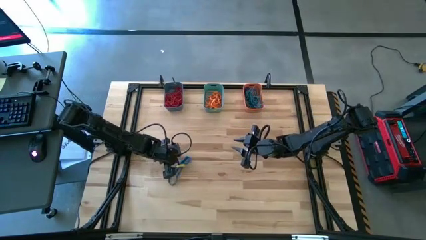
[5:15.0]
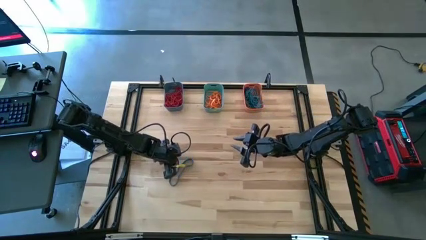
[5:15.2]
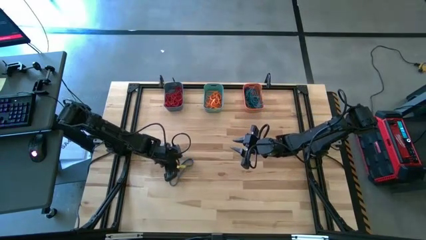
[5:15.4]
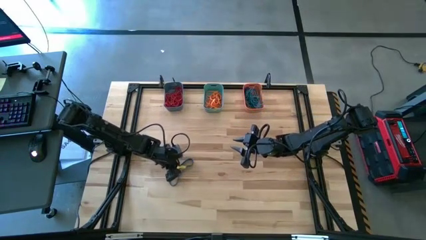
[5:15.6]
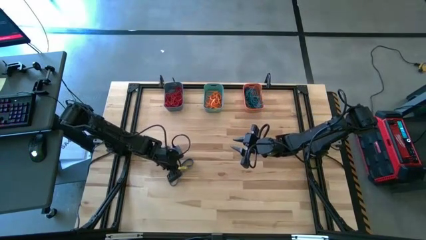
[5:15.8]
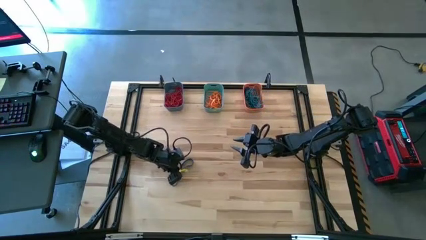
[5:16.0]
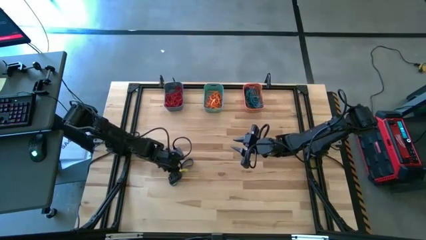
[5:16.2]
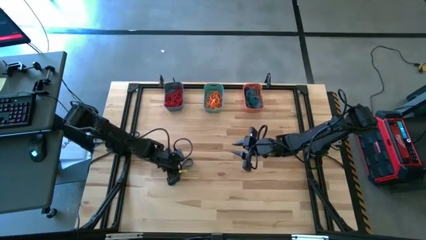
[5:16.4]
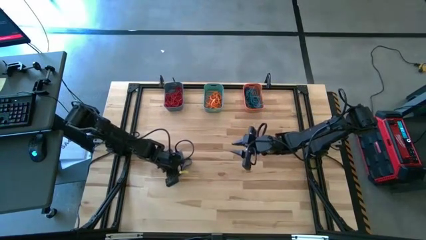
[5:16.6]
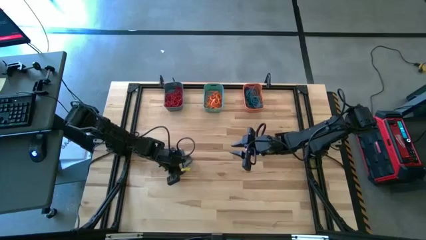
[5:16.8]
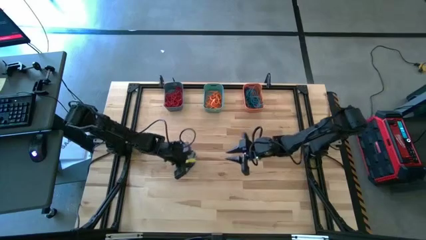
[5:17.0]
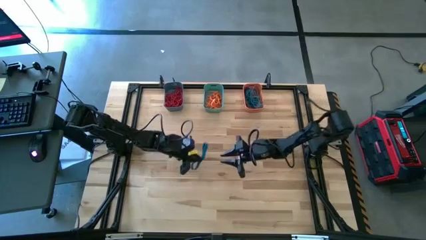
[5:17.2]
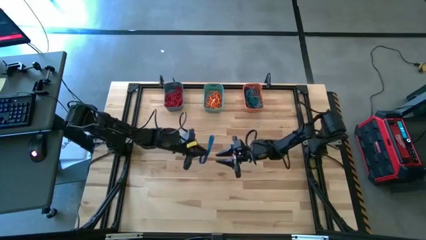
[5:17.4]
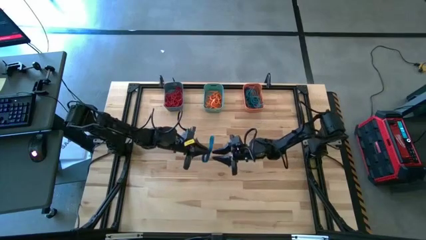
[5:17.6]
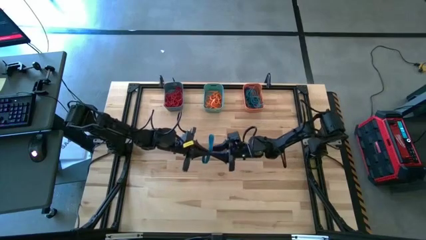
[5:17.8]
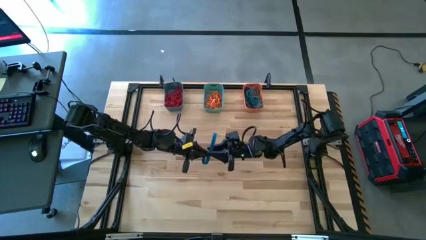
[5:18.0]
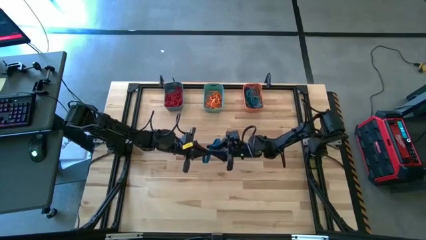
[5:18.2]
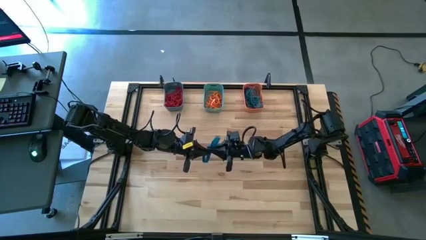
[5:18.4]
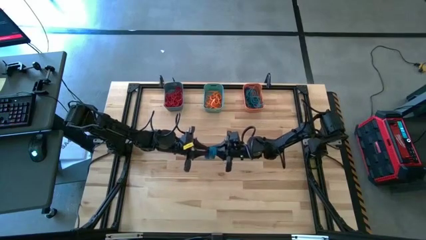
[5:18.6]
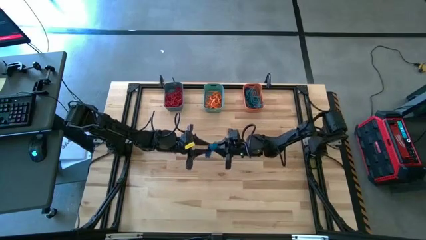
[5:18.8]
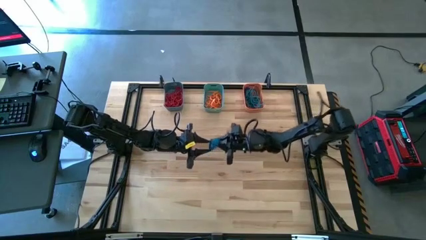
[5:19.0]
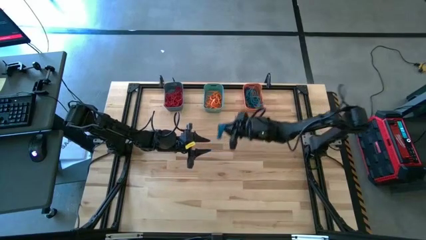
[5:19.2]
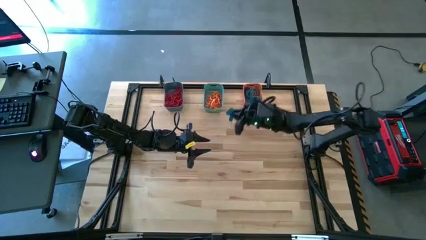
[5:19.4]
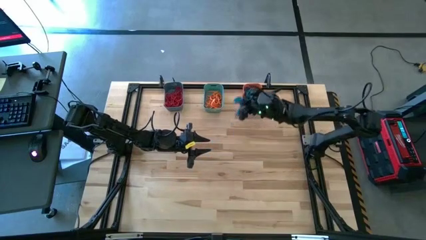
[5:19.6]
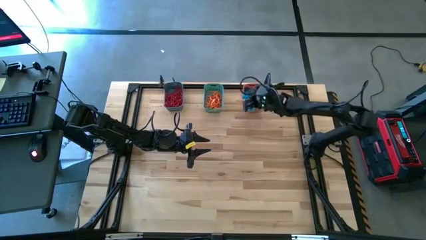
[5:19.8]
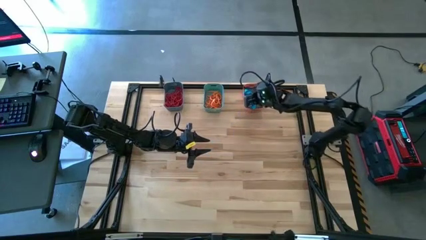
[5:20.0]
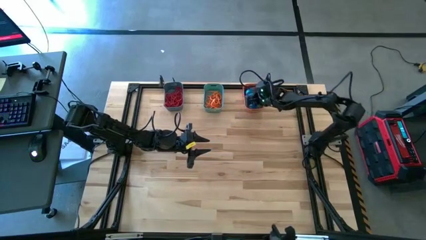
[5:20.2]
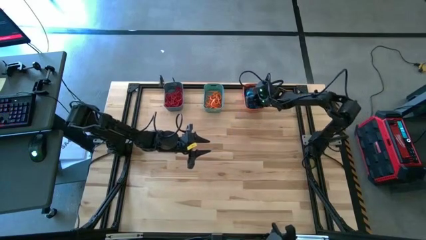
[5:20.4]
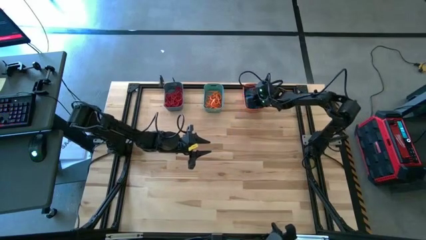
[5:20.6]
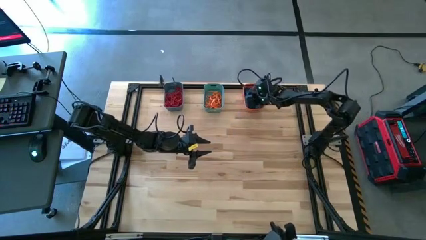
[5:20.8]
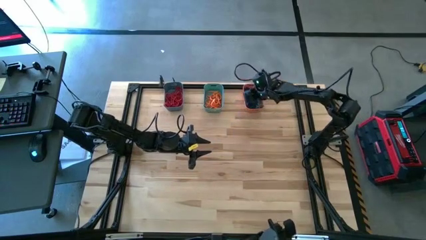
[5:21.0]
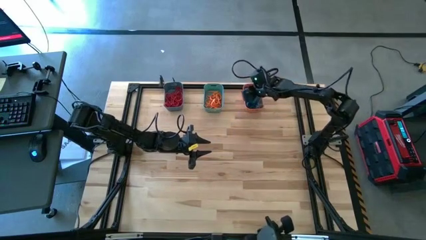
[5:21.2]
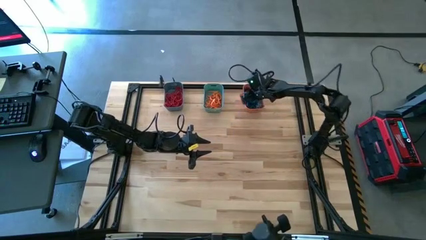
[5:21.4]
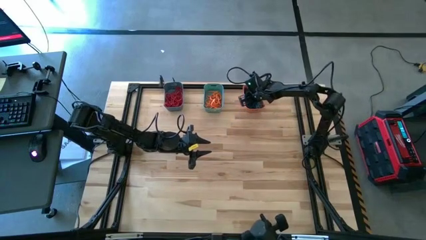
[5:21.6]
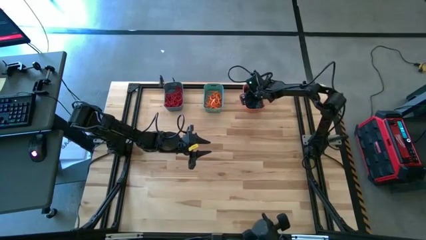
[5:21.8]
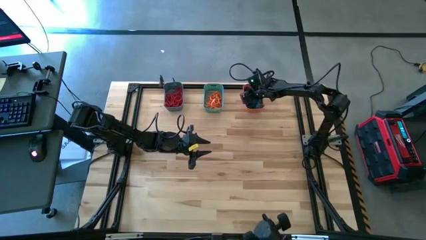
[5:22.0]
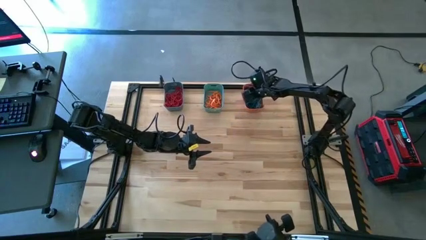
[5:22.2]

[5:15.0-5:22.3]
Task: Sort rubber bands into baskets
Put the blue rubber band into the orange bin

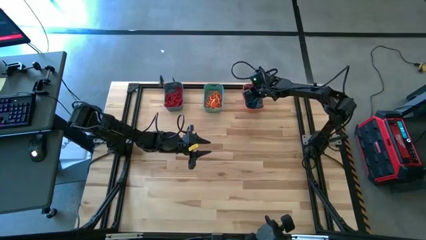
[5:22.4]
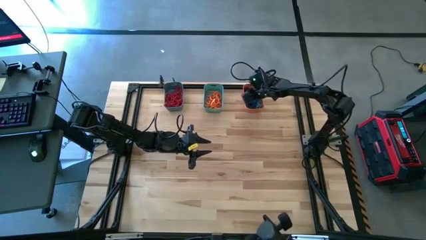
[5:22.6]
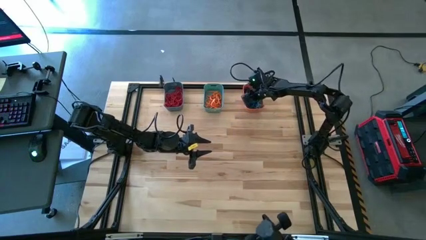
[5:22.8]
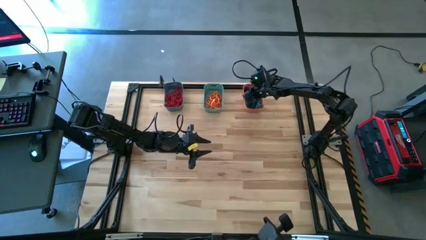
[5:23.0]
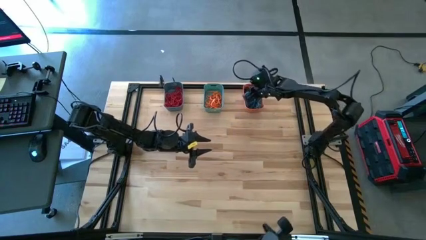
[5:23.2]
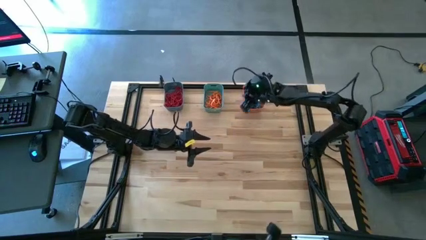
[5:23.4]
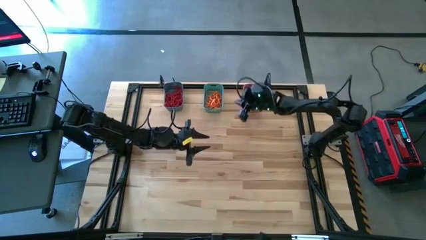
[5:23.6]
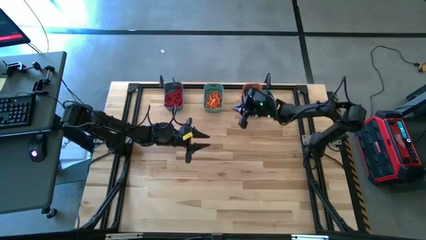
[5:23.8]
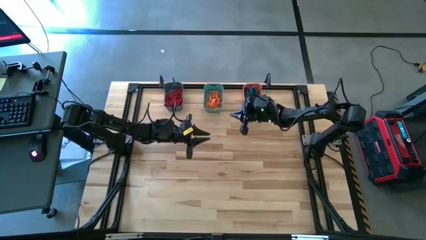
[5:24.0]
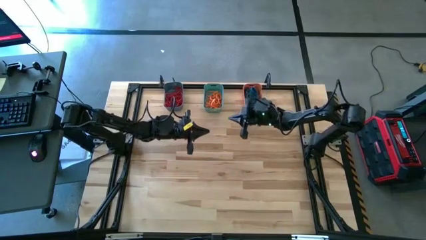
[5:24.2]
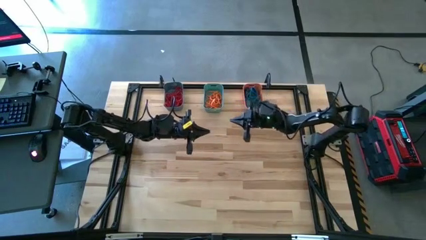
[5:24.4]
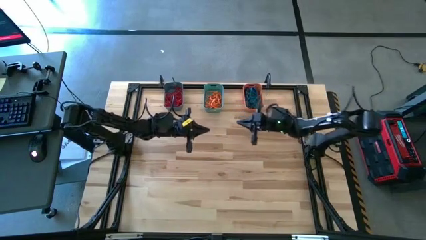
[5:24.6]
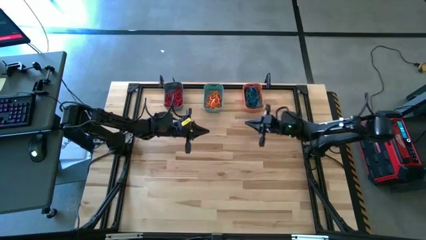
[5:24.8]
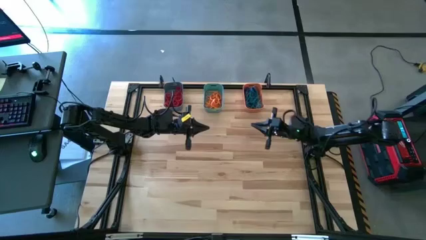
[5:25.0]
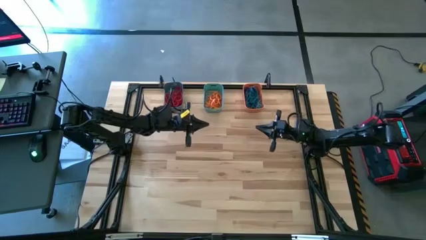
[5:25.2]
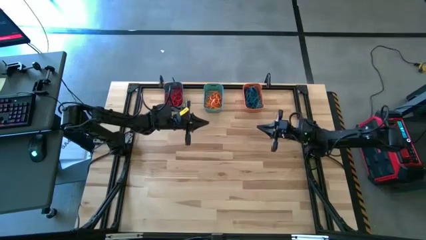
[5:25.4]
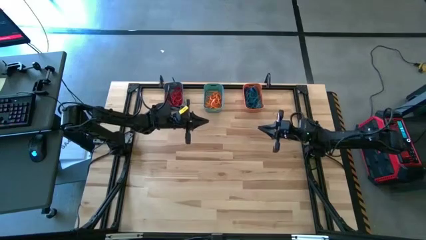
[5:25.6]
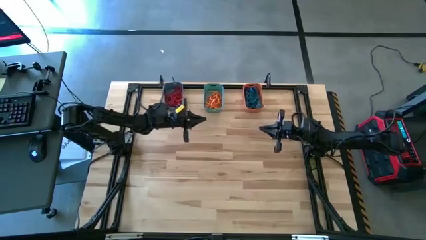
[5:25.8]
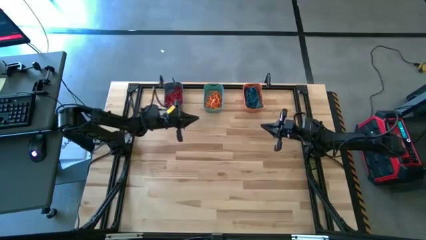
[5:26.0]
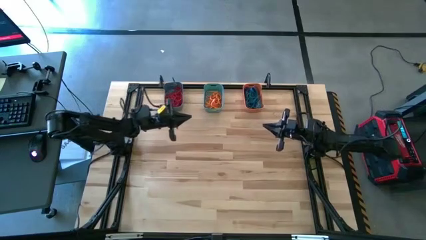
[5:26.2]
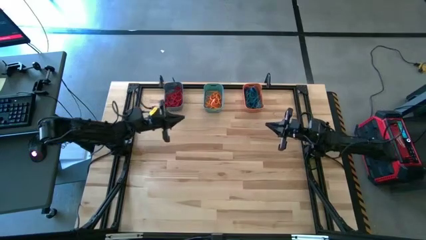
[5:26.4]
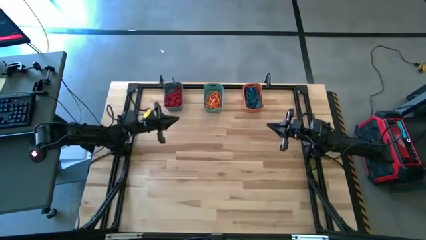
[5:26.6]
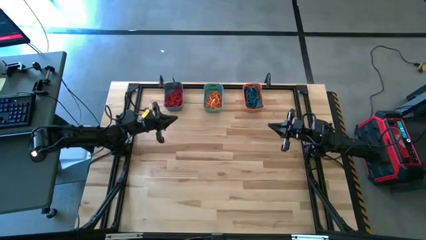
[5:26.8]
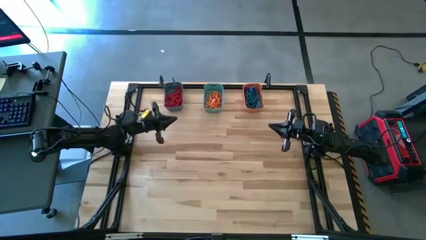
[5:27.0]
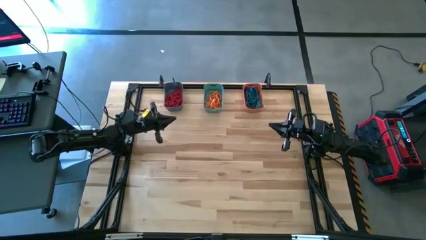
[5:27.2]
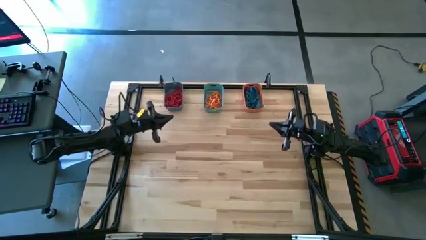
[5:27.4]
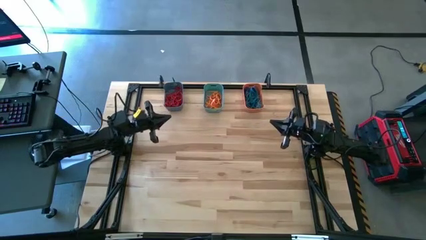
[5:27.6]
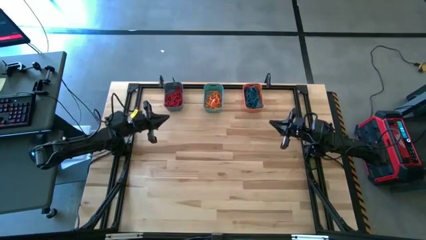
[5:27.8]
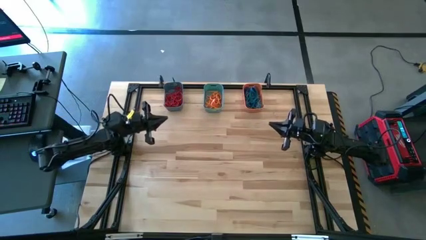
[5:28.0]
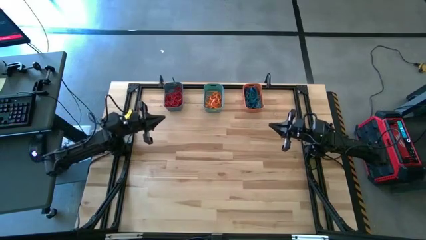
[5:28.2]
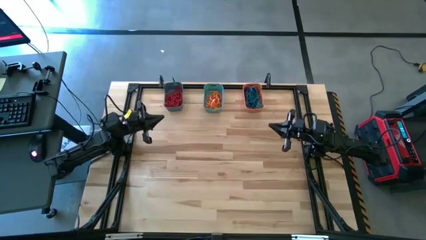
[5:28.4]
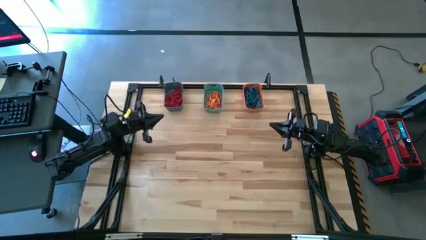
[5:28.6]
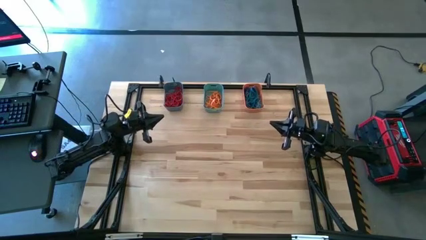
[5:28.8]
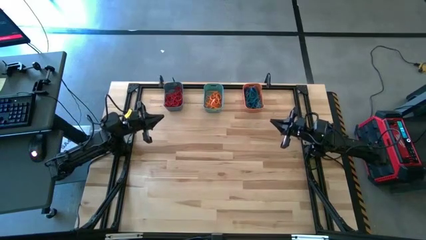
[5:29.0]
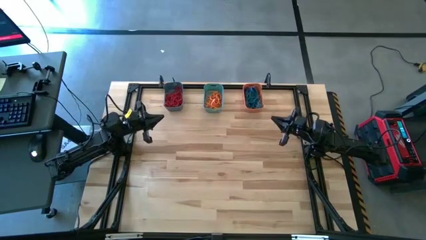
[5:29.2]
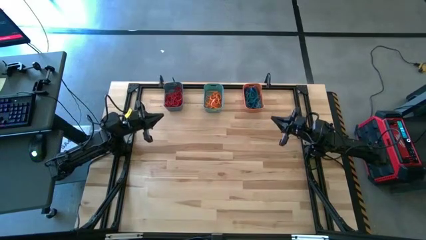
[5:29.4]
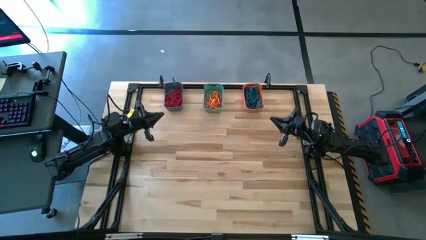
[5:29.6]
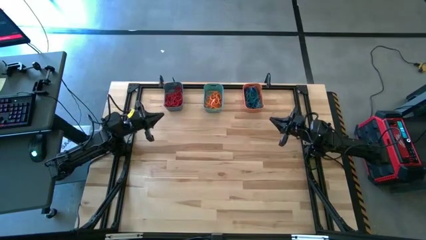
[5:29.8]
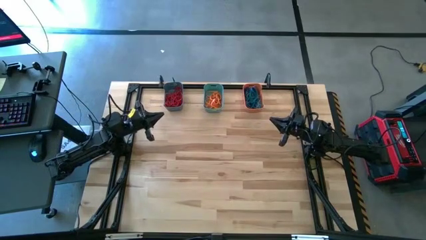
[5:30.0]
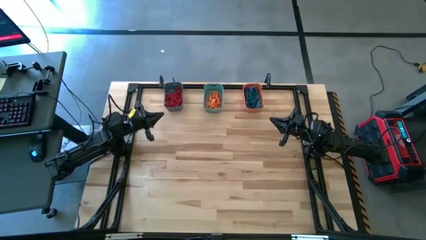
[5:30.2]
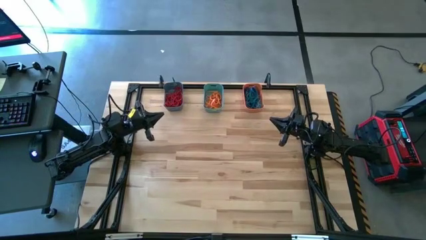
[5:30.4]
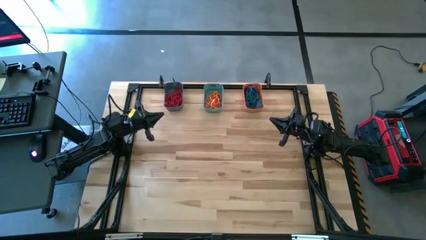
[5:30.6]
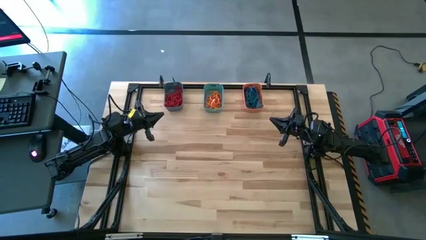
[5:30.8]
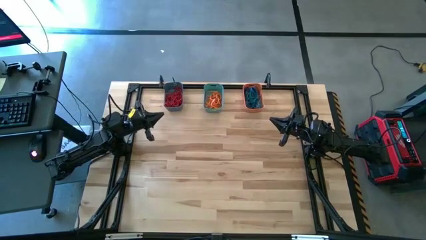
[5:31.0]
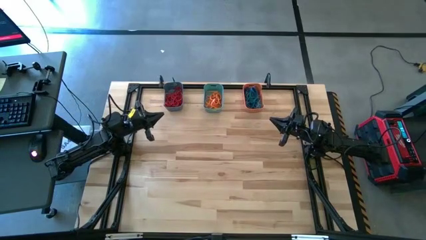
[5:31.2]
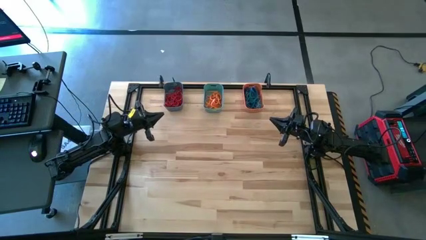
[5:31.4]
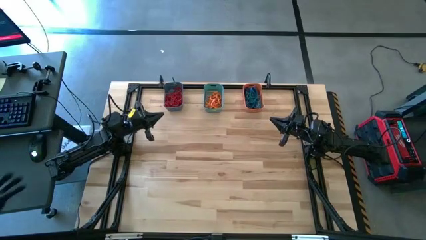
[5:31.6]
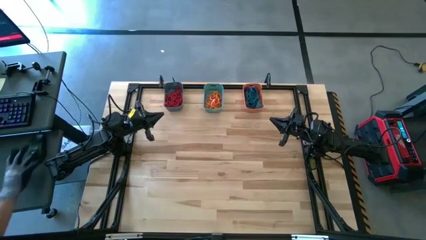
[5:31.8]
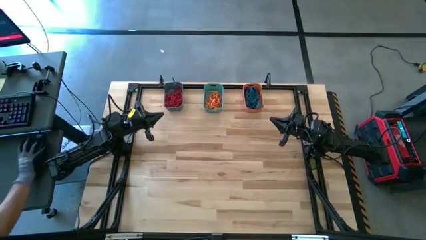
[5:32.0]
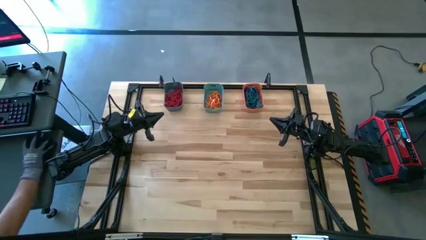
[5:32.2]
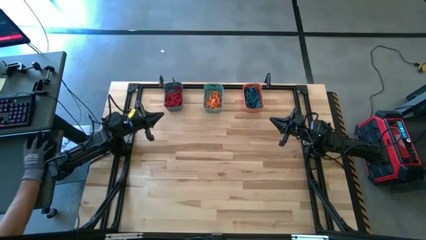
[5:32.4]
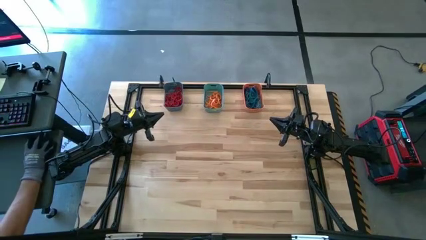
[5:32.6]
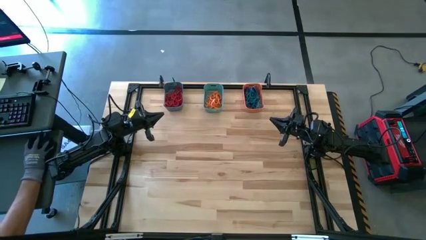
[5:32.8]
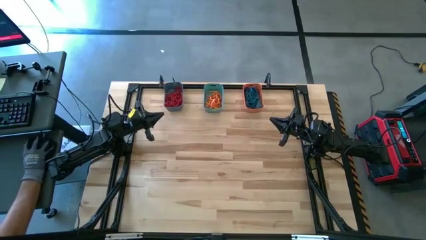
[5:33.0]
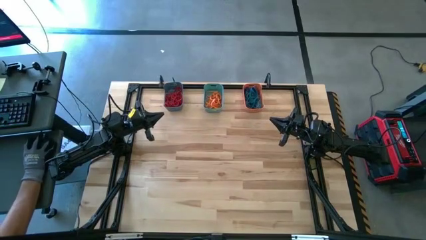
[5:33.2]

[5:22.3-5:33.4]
Return to Home Position
